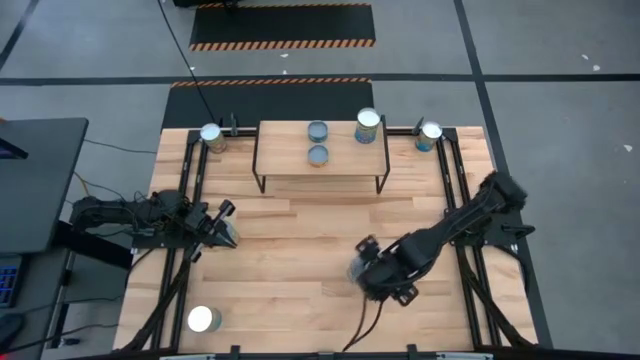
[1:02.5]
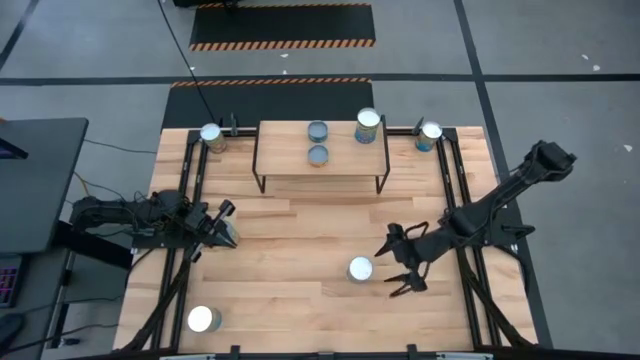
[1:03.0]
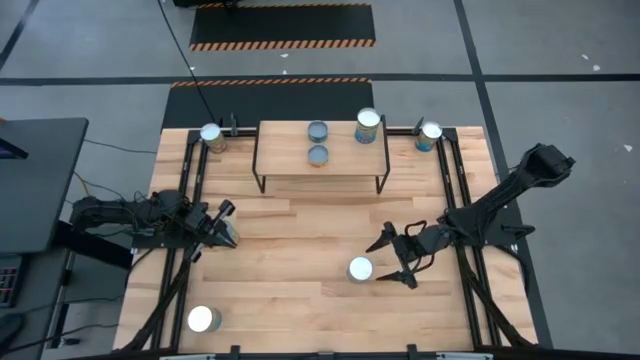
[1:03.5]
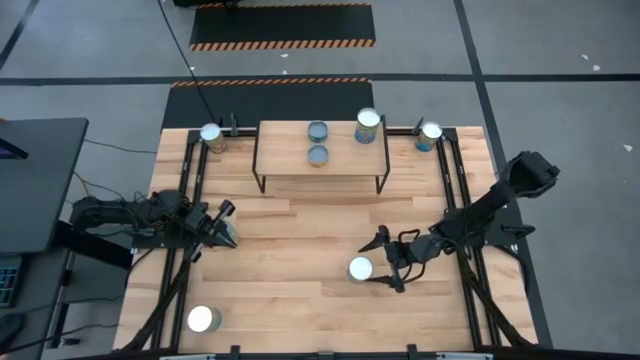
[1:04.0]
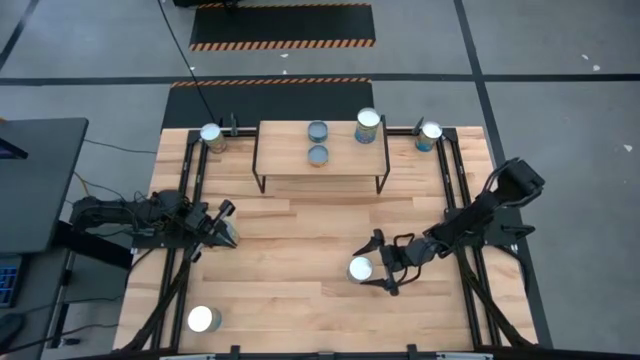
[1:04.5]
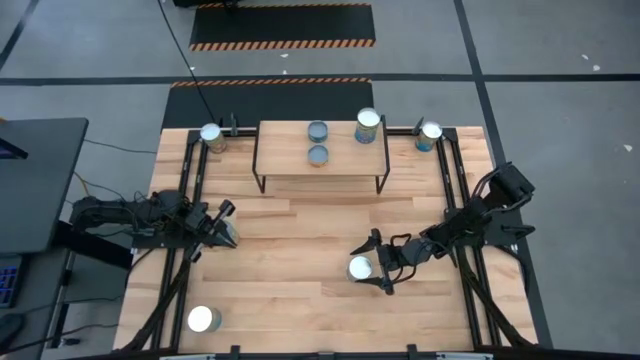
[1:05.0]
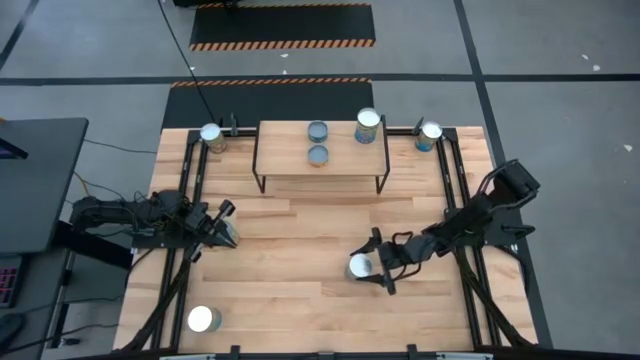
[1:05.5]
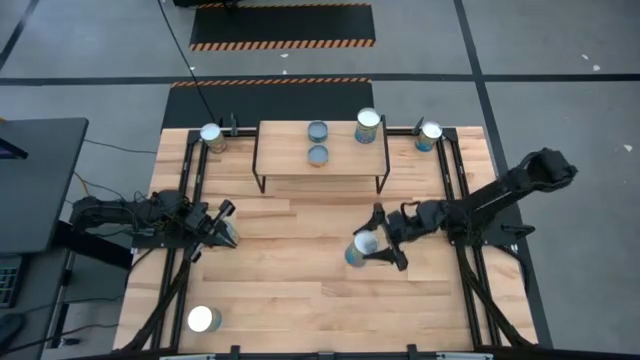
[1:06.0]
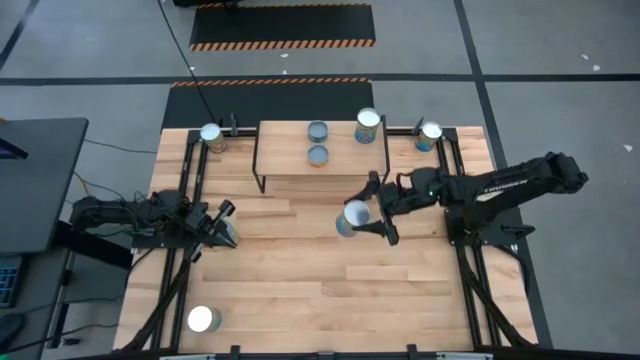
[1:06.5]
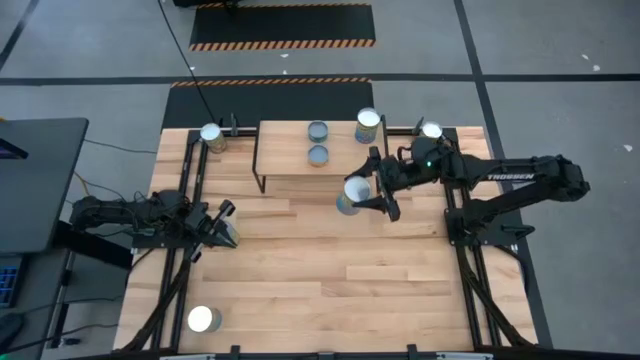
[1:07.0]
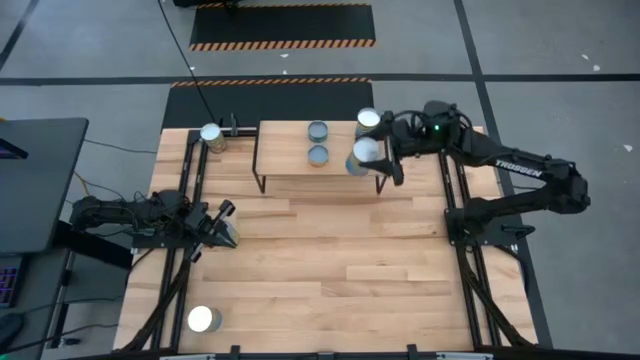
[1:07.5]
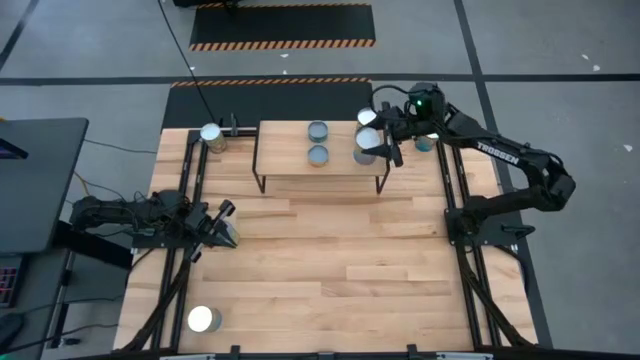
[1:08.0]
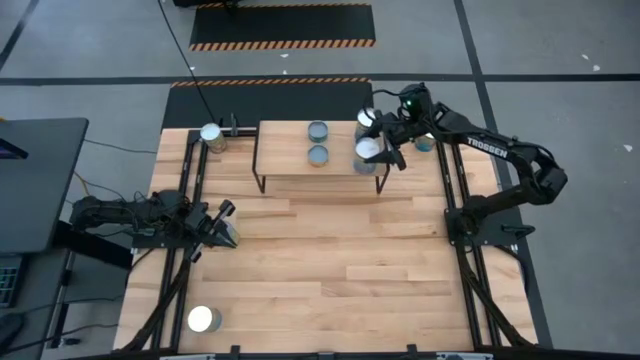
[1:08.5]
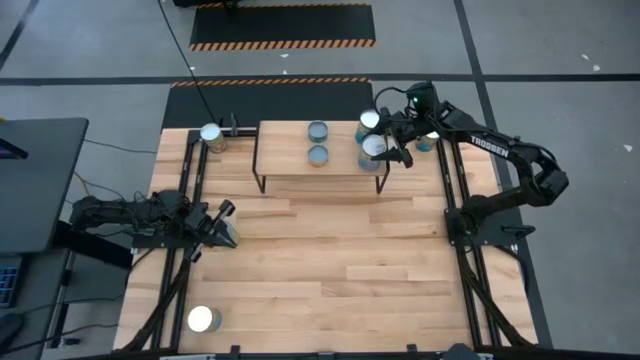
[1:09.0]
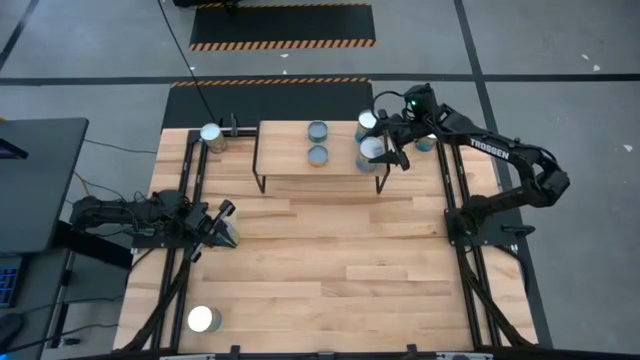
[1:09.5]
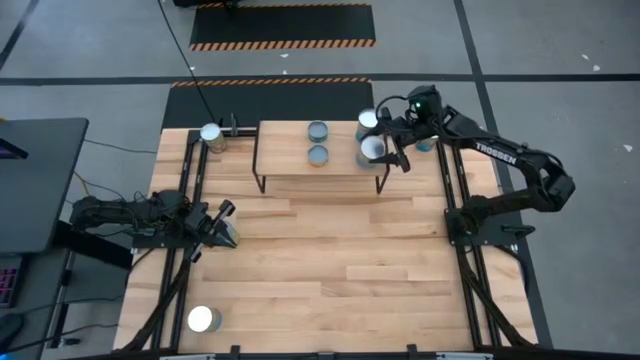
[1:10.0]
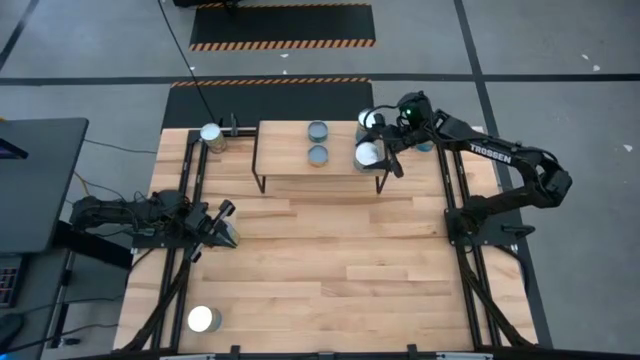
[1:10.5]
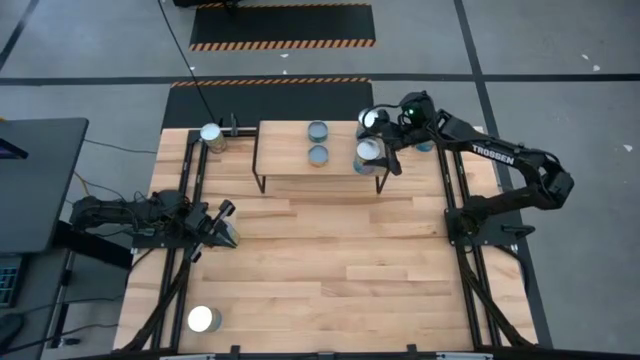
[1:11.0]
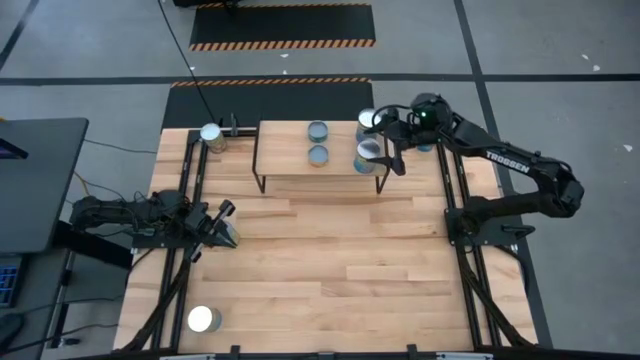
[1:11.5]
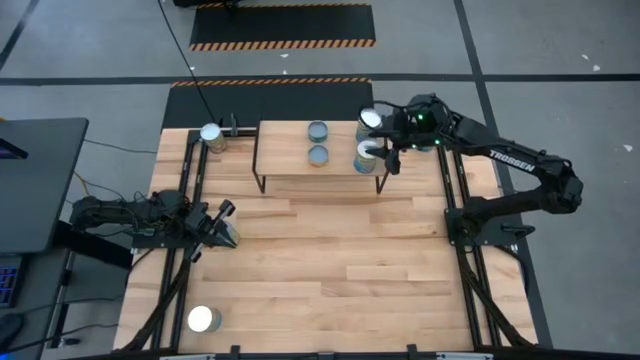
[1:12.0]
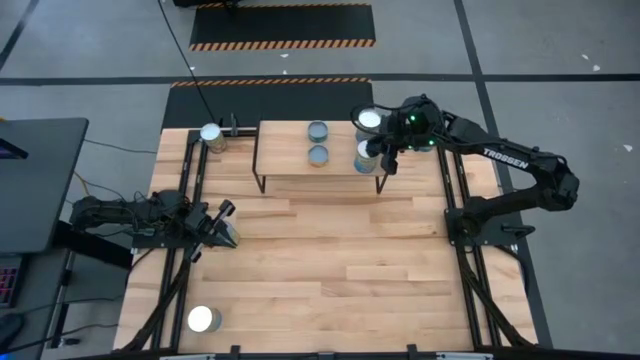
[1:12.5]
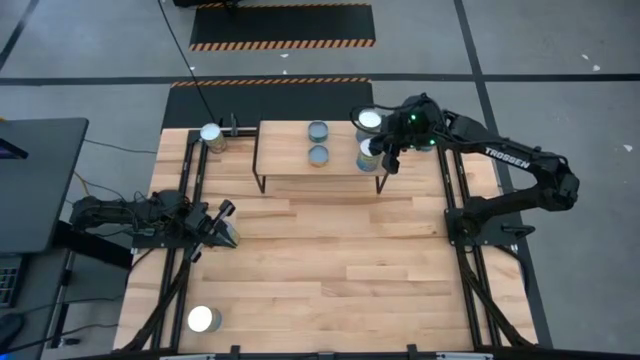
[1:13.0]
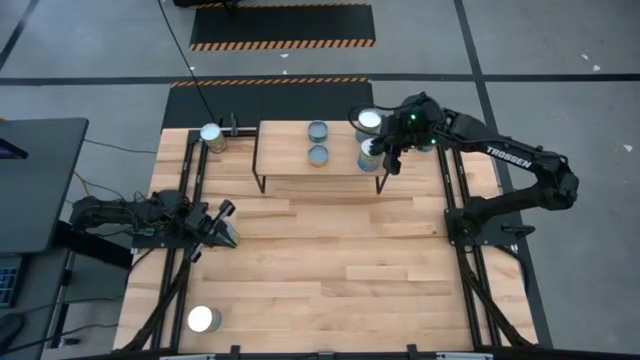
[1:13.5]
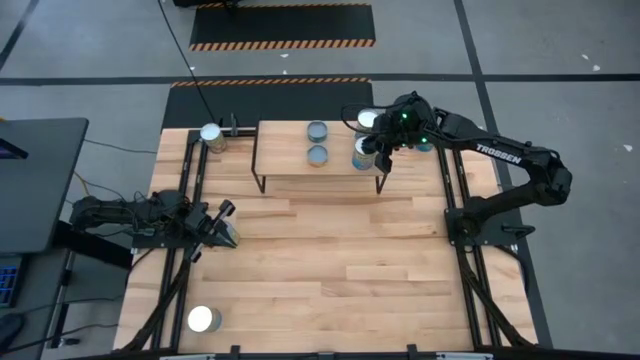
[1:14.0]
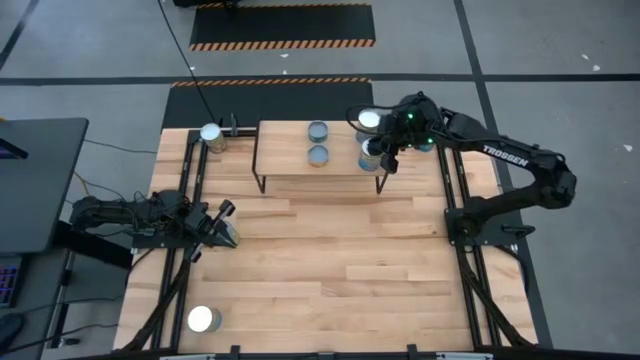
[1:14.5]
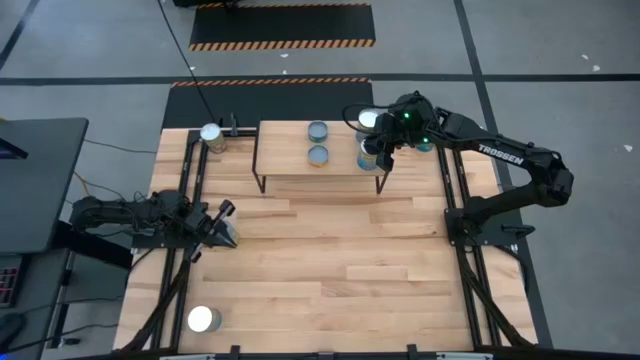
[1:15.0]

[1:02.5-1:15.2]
Task: Pick and place cans onto a shelf
Put the big blue canned cherries on the shelf aligned with the other big blue canned cherries

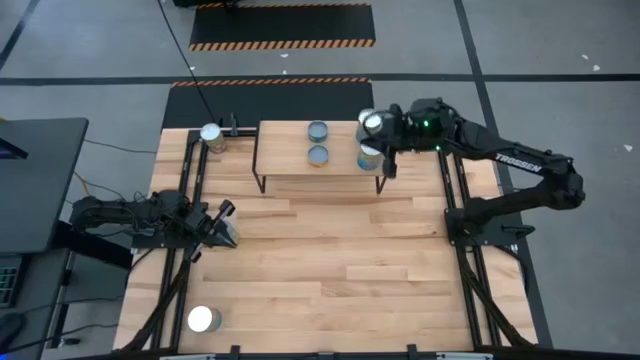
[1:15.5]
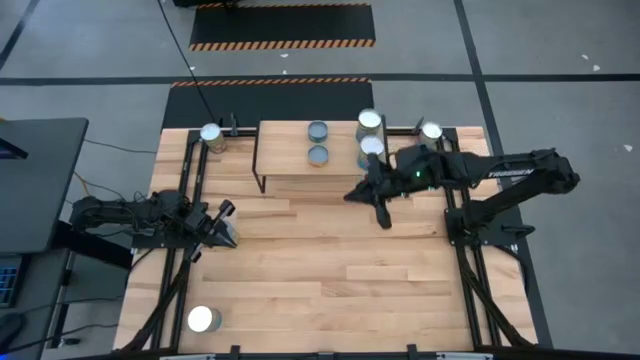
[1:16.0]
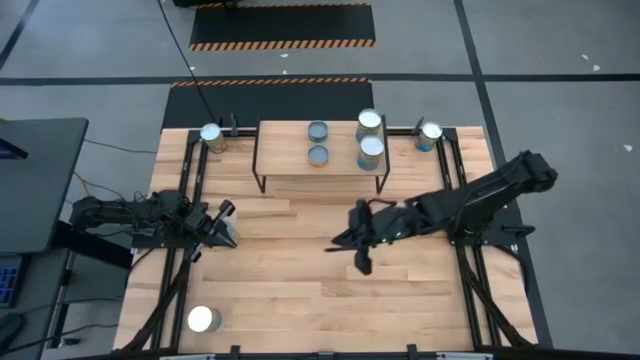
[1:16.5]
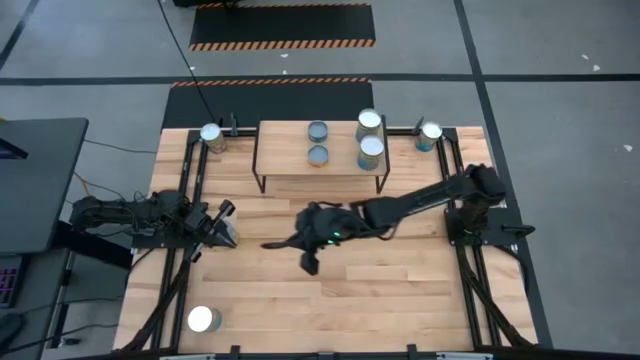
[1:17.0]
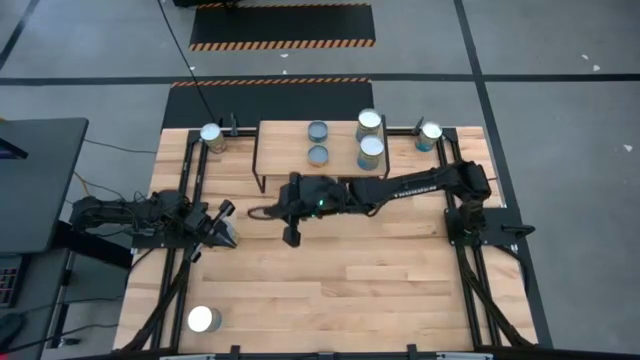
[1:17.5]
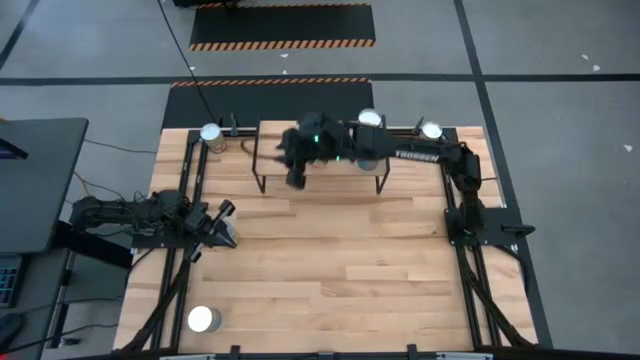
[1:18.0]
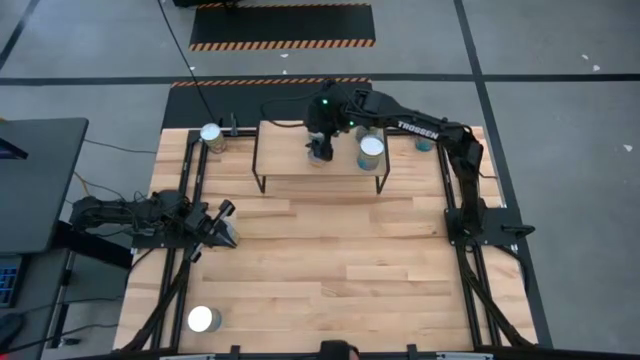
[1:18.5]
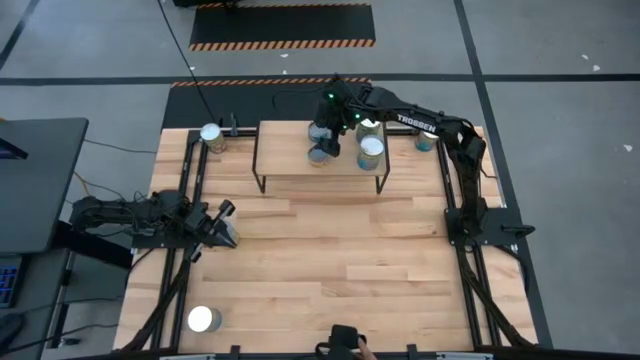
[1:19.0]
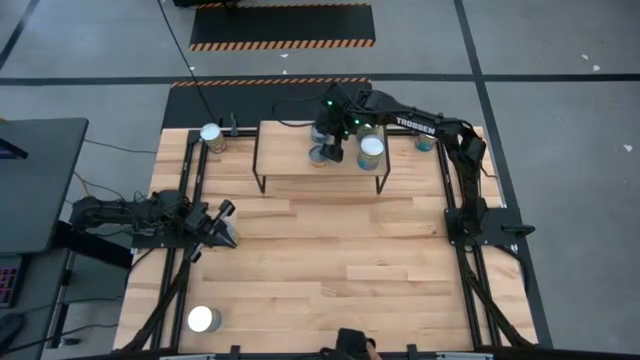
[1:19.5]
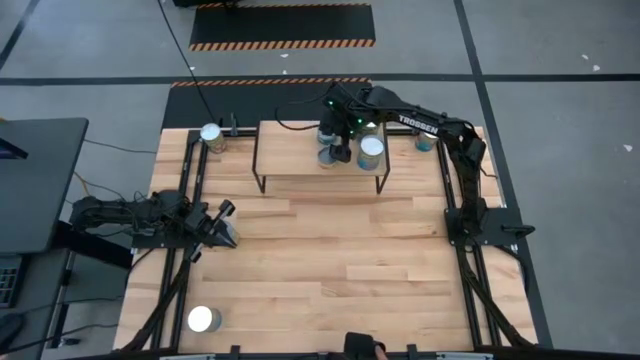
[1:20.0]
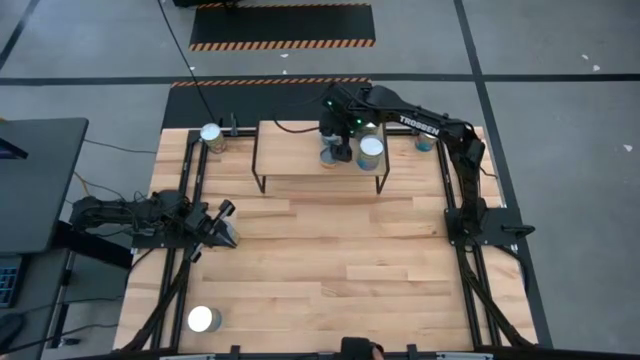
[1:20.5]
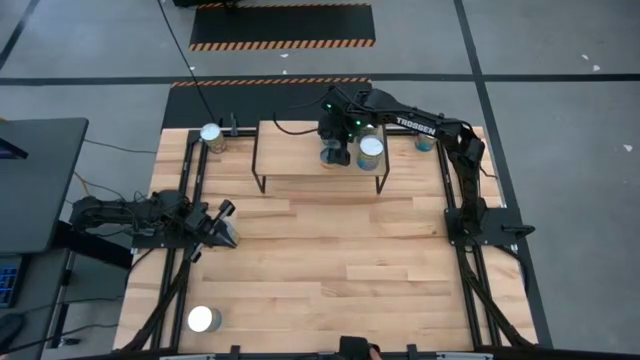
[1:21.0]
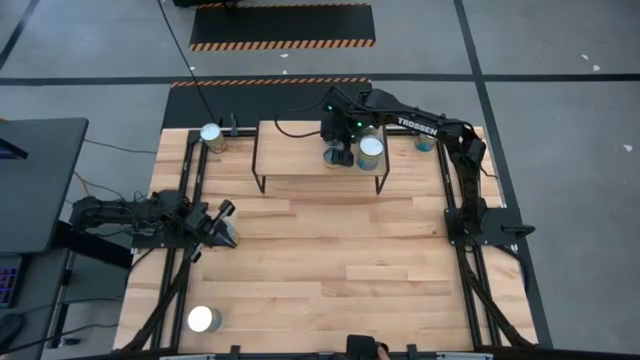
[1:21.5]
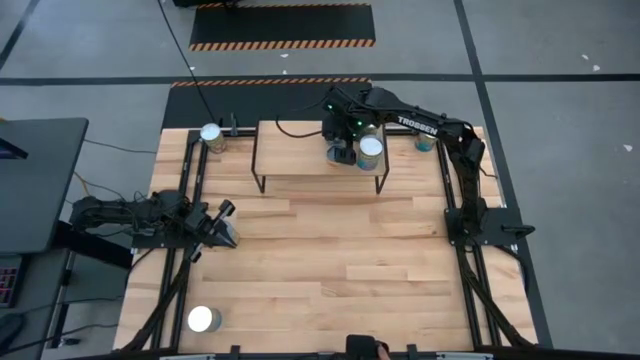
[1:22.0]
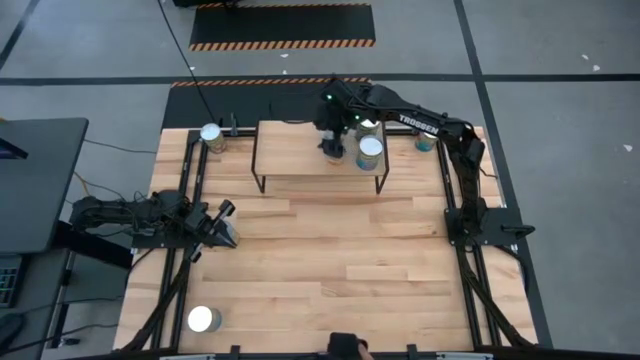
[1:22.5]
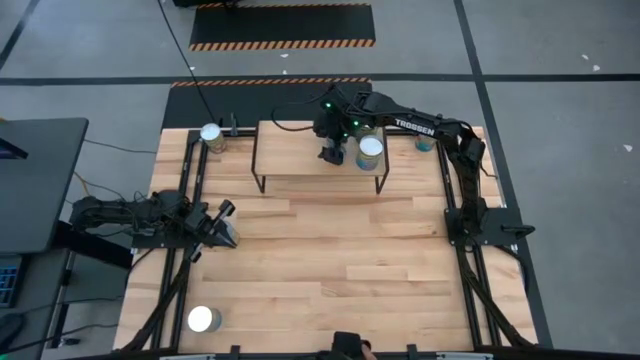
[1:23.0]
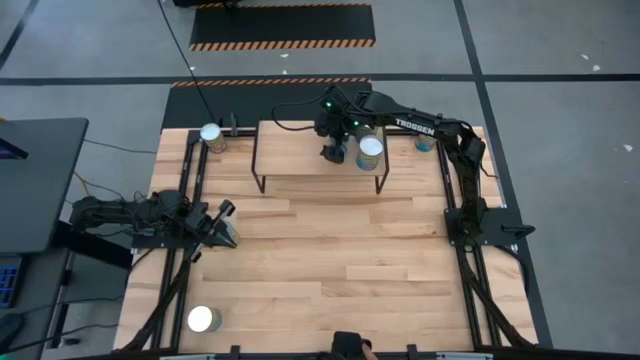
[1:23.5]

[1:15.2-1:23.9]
Adjust the small cans on the shelf
